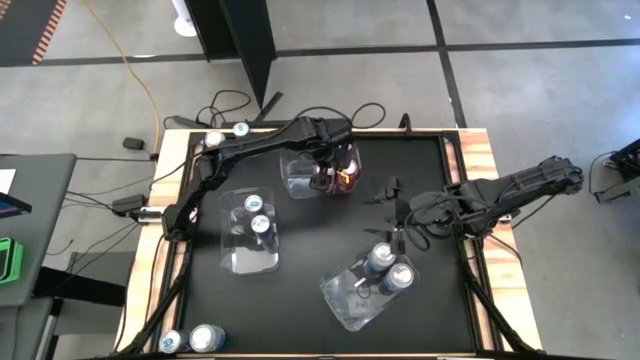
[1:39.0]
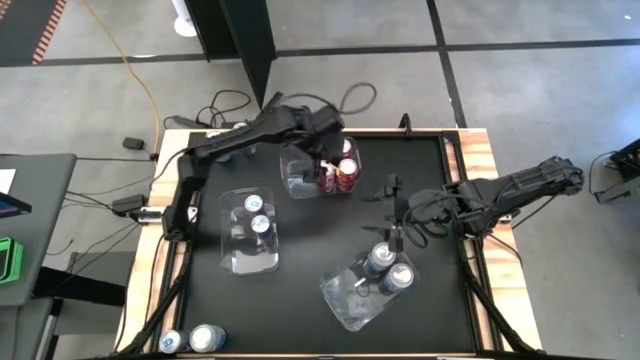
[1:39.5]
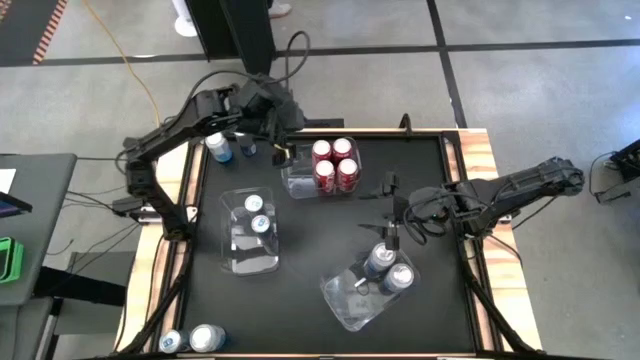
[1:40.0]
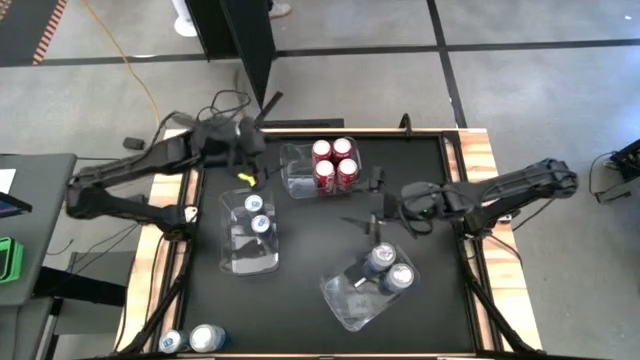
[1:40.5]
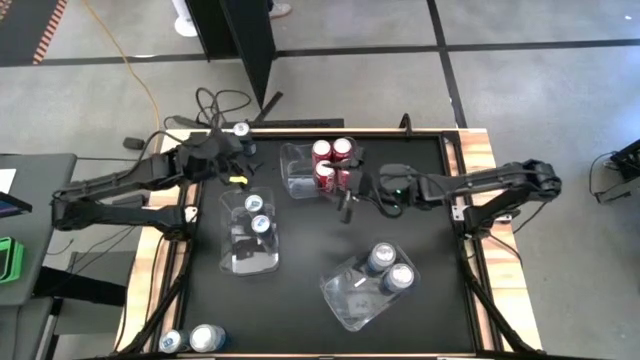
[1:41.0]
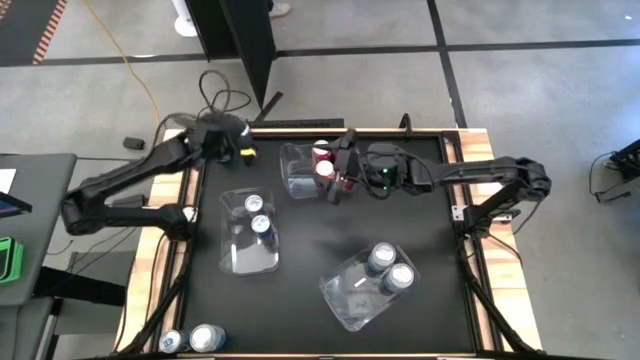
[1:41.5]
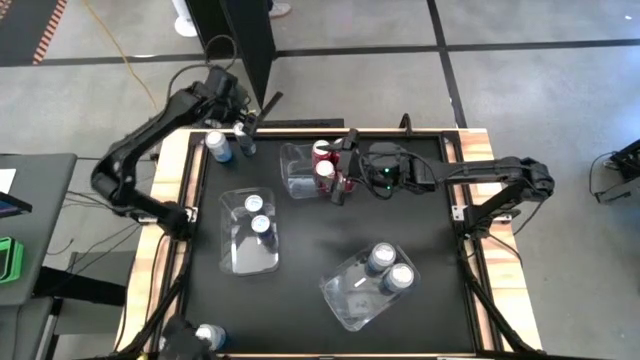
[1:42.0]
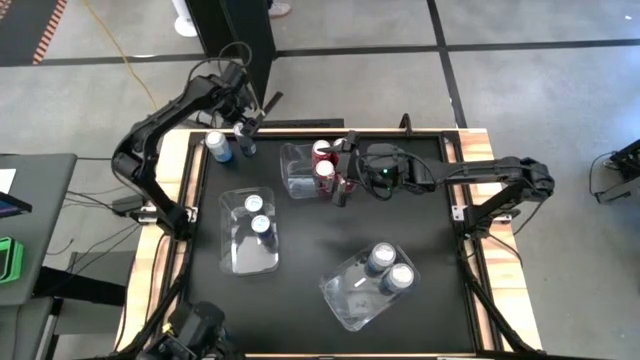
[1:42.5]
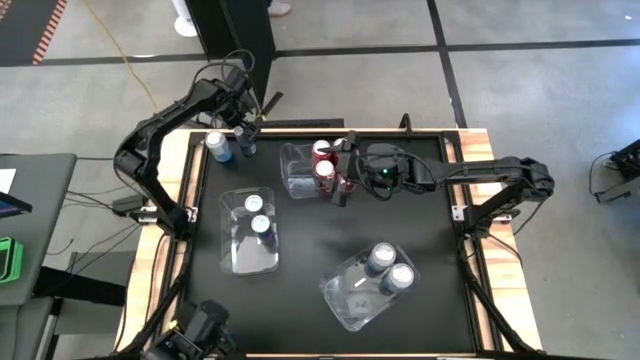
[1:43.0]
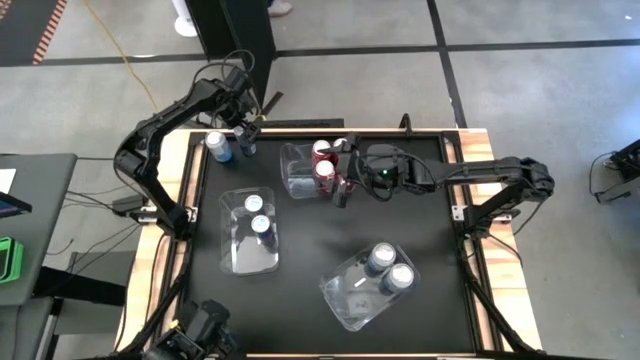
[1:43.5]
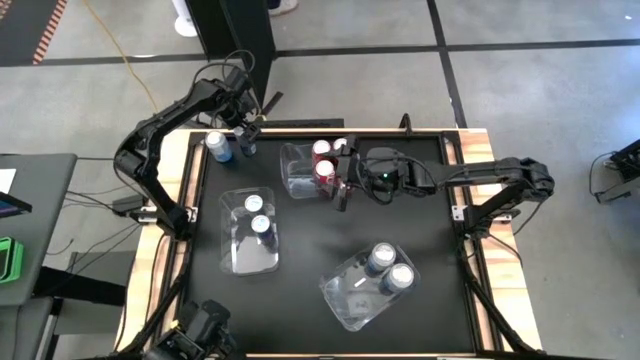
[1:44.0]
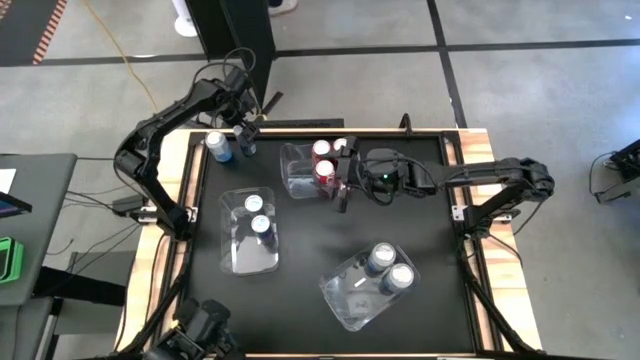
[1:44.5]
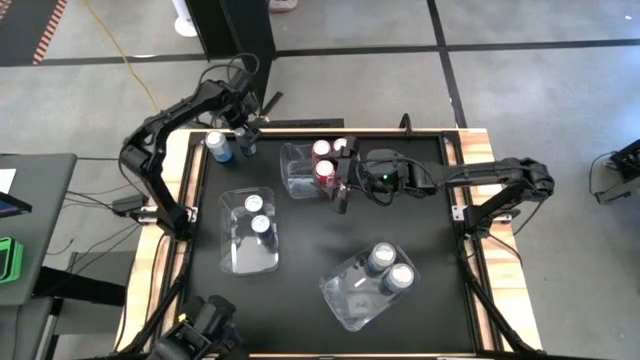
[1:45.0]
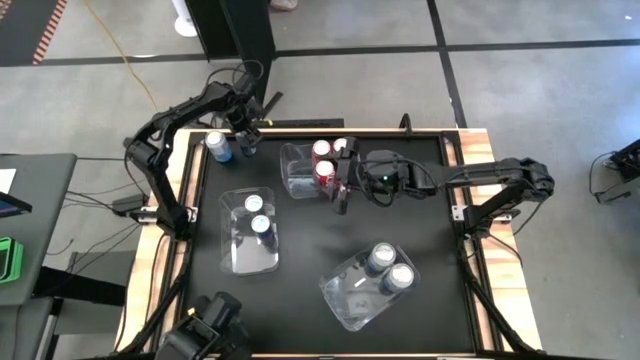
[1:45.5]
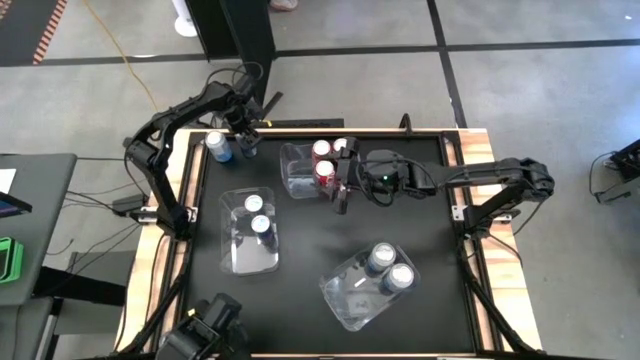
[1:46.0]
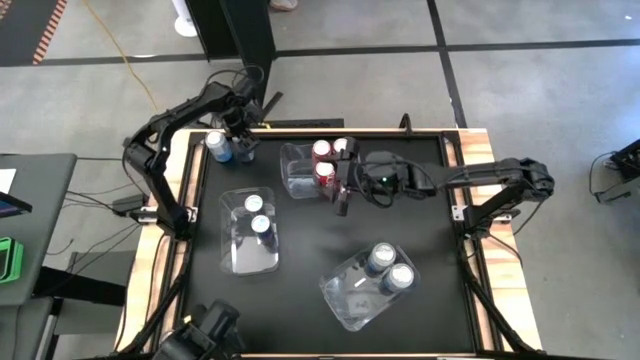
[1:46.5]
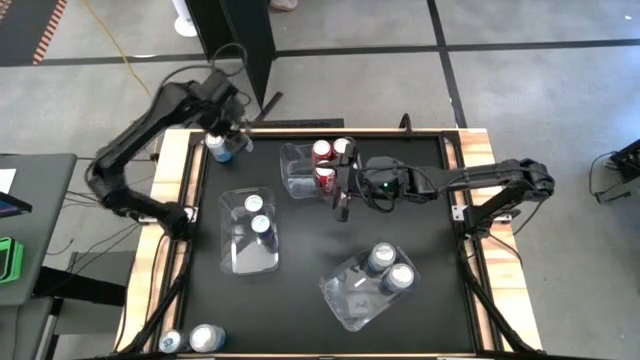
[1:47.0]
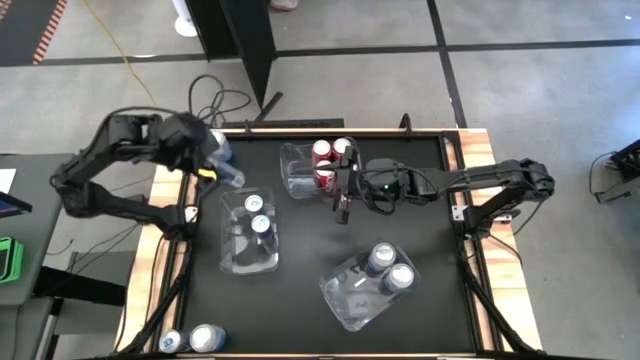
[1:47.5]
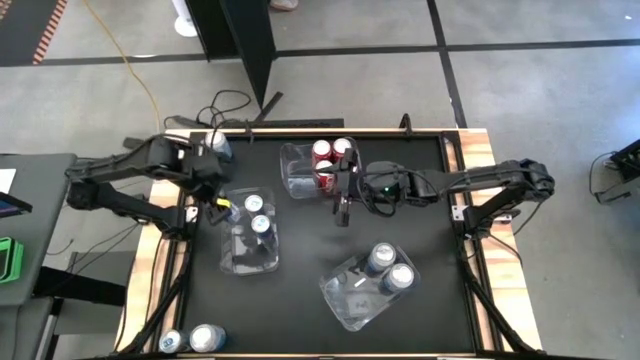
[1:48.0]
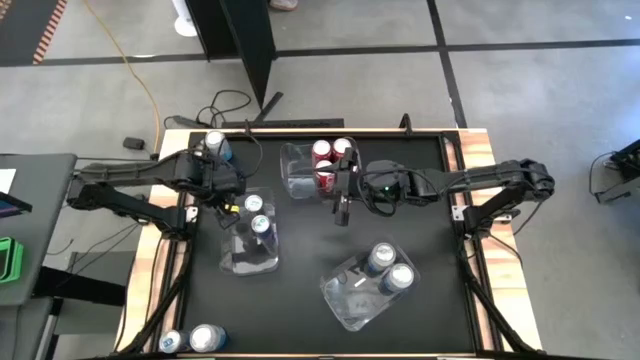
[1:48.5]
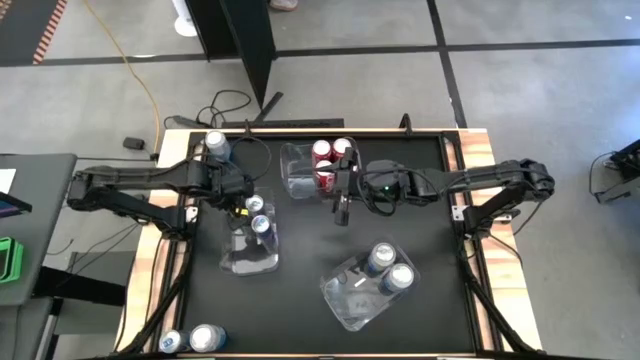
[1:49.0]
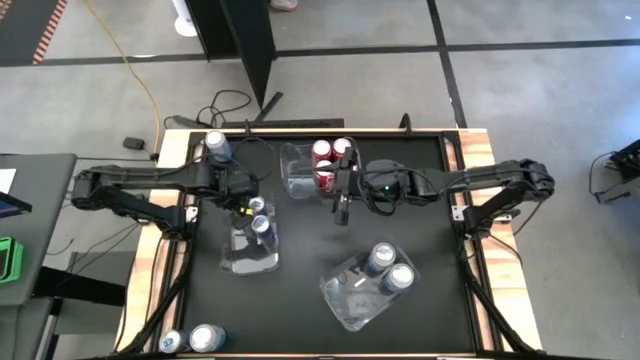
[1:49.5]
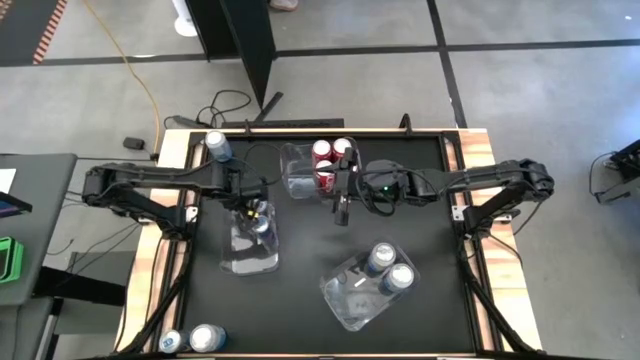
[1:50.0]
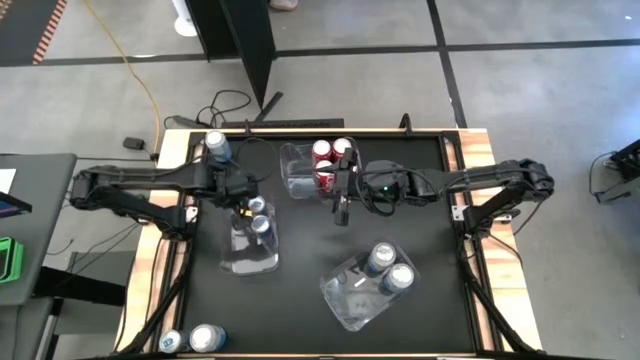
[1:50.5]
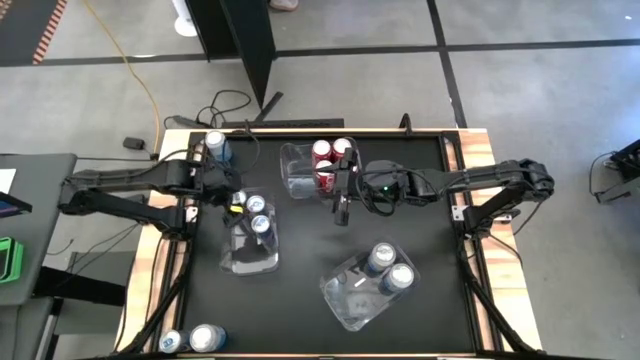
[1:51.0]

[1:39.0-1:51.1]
Task: Sort soda cans
Put the blue soda can into the middle left transparent bin

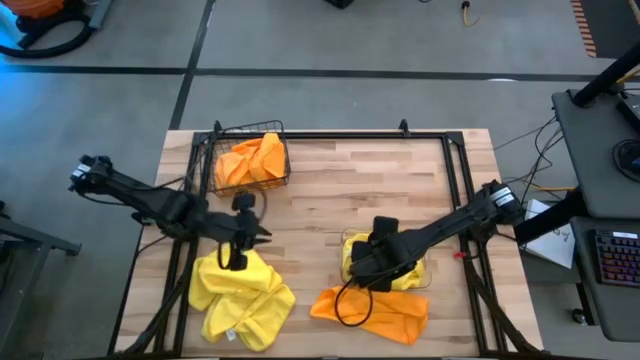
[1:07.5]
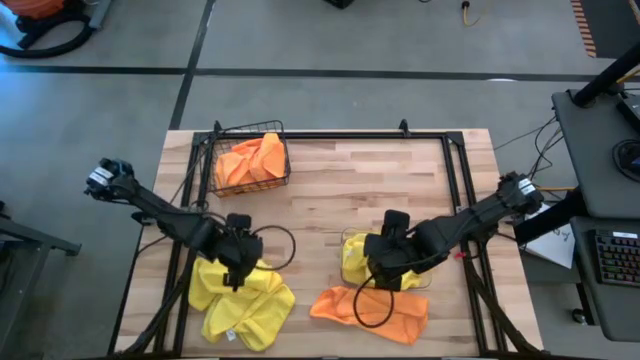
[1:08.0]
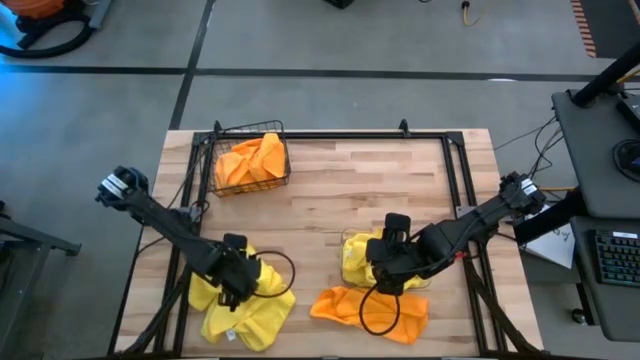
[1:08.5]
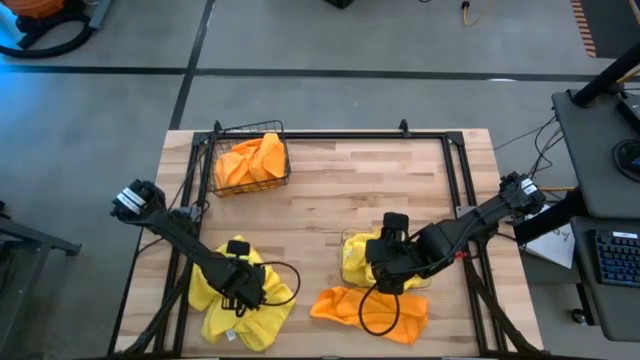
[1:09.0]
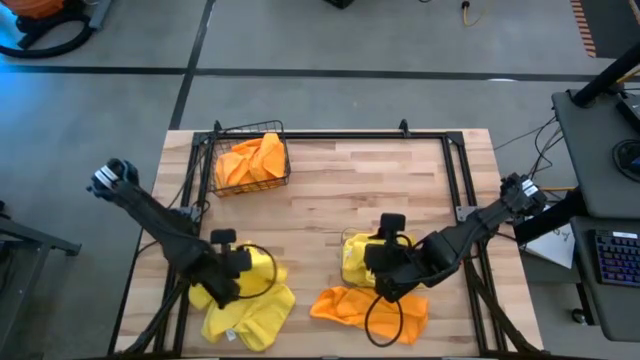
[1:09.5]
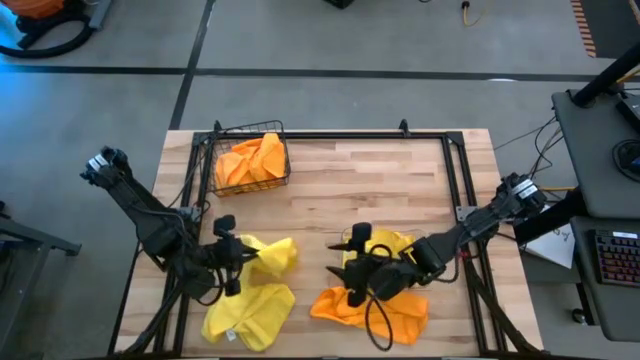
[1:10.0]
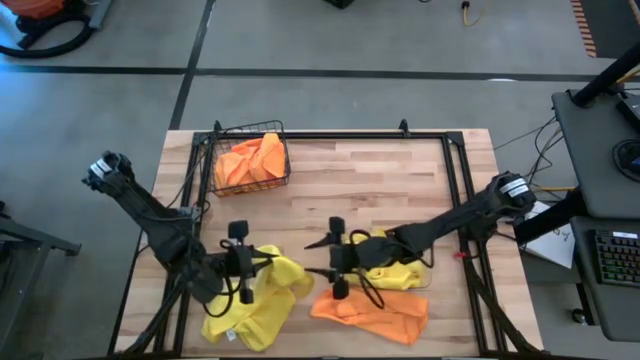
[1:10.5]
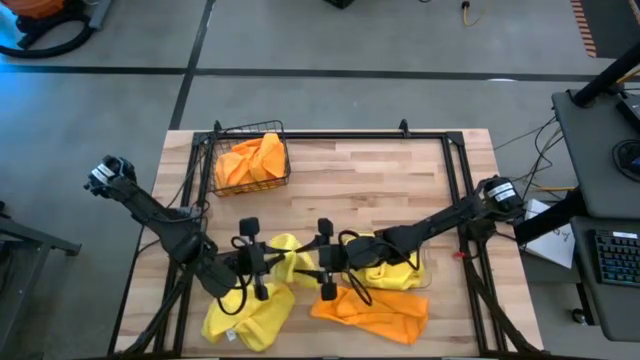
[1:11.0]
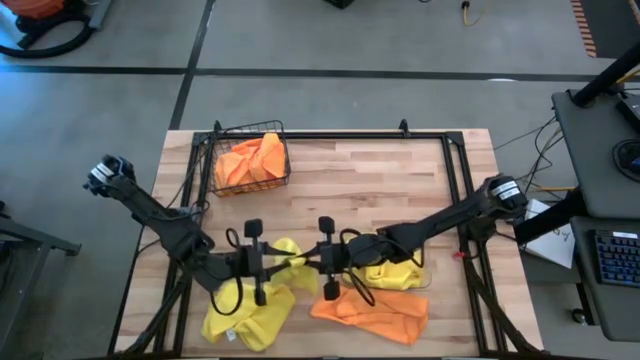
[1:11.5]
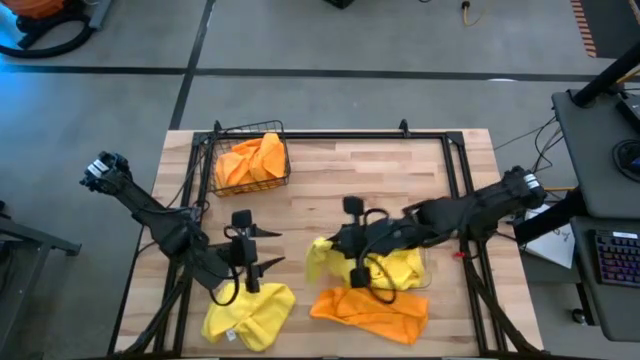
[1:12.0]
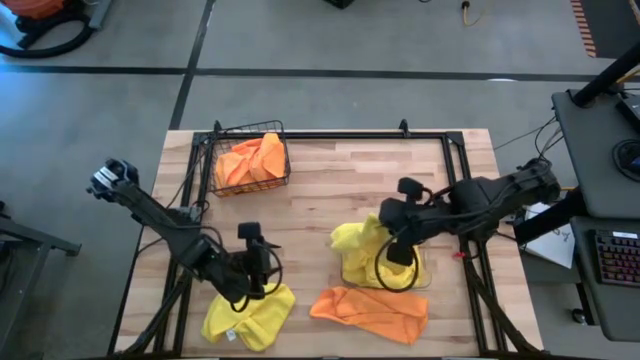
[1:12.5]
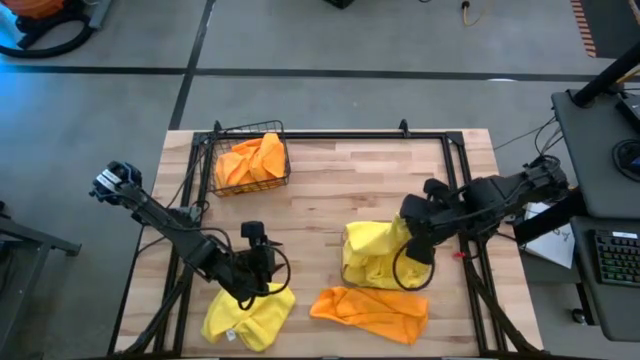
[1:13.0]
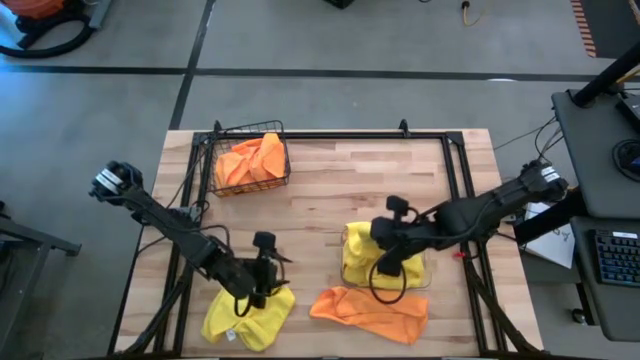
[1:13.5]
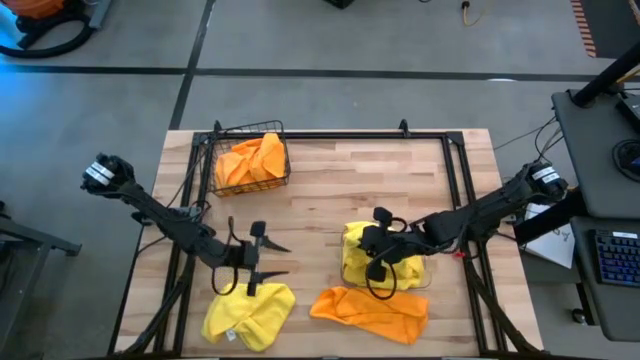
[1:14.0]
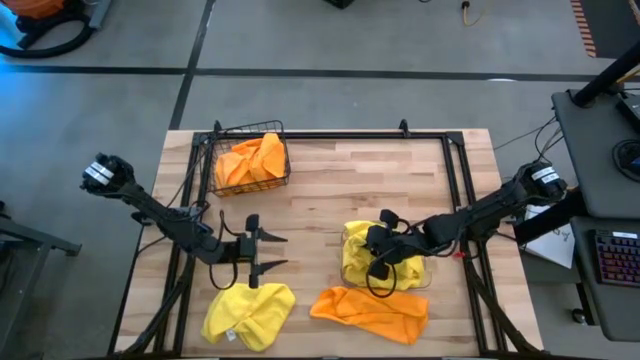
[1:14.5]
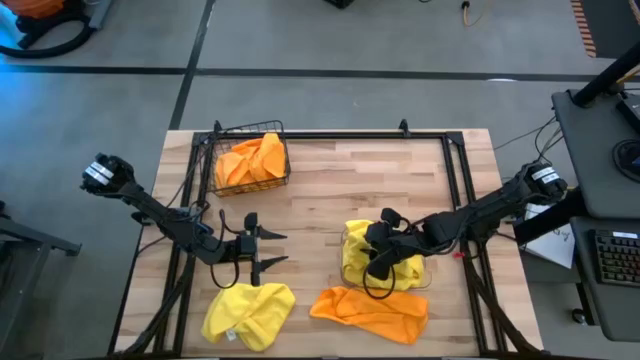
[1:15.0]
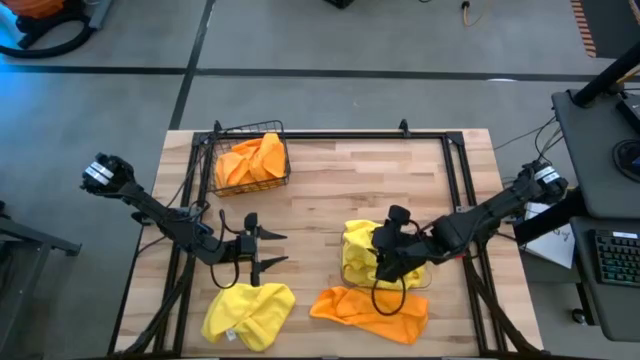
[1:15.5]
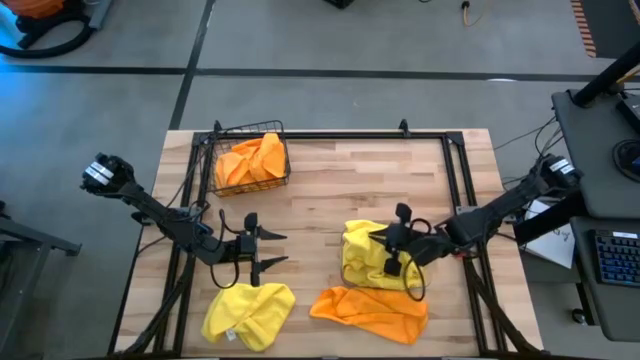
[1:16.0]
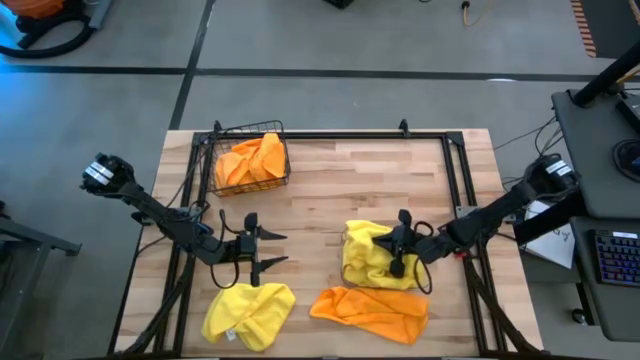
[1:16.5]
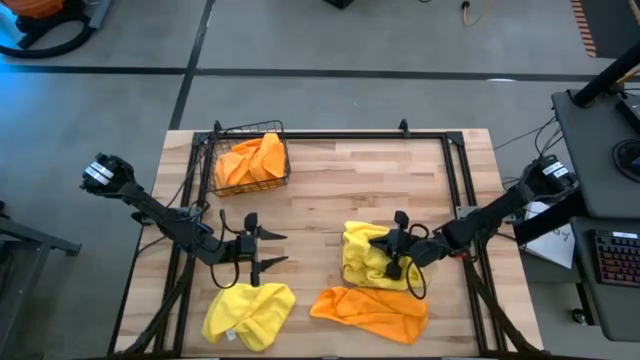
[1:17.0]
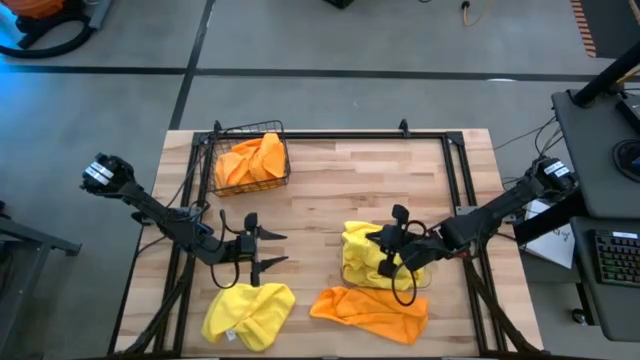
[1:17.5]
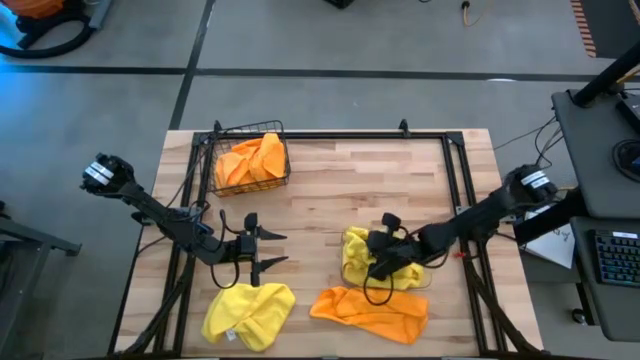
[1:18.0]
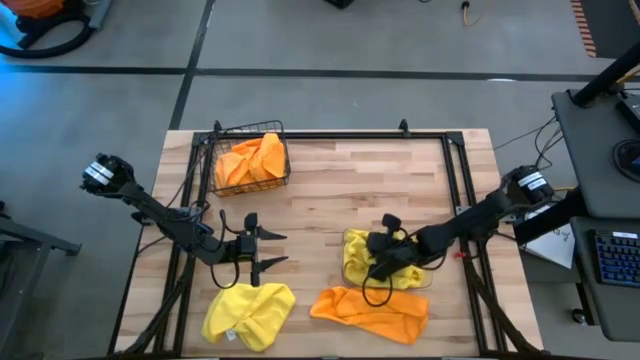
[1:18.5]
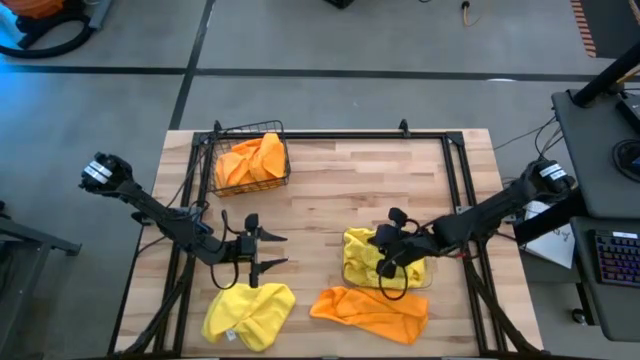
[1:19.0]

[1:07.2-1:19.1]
Task: Sort microfiber towel by color & place in baskets
Put the yellow towel into the transparent bin
